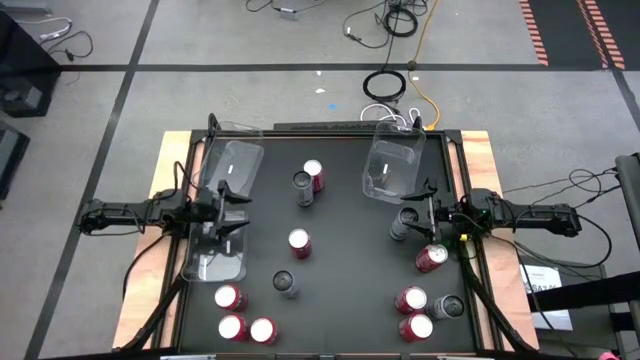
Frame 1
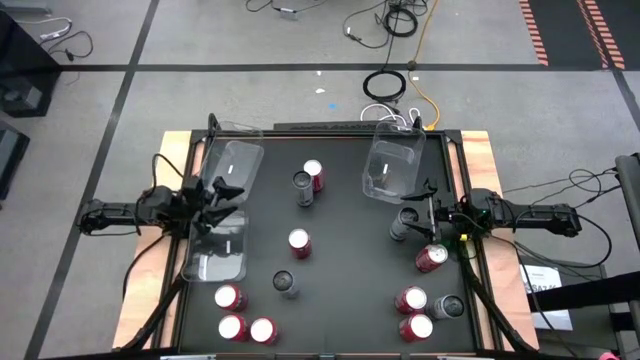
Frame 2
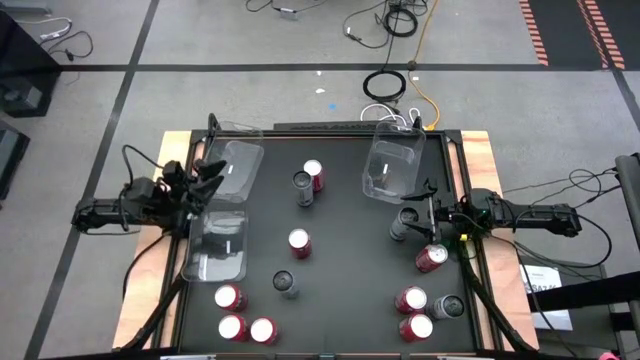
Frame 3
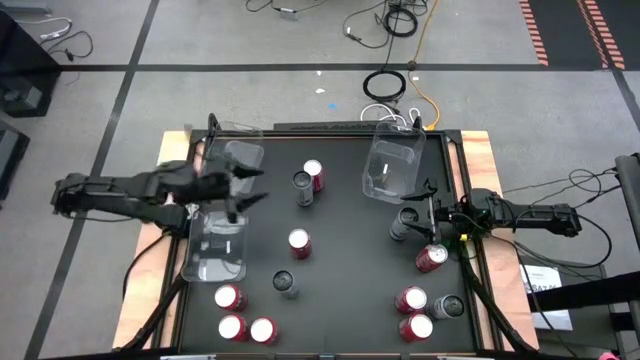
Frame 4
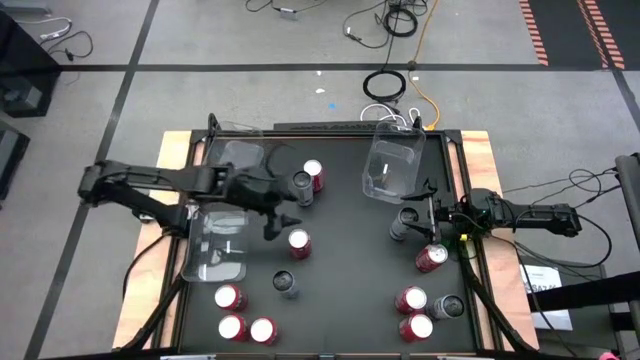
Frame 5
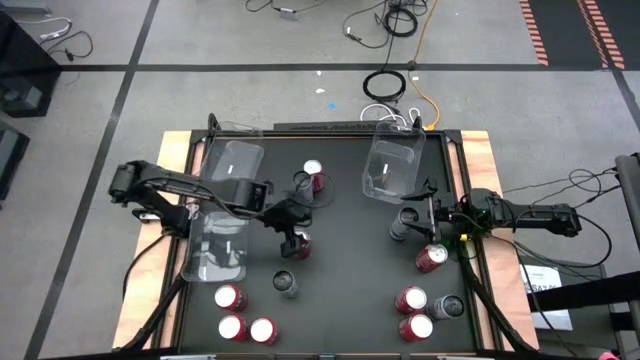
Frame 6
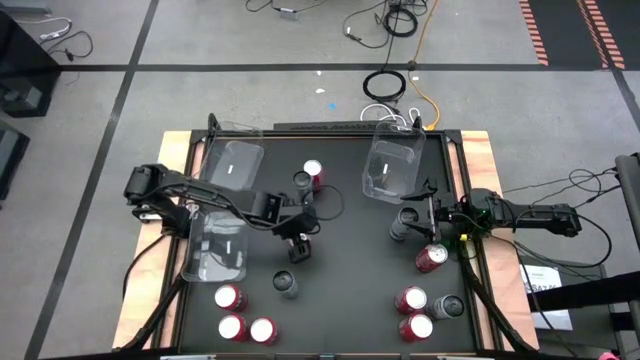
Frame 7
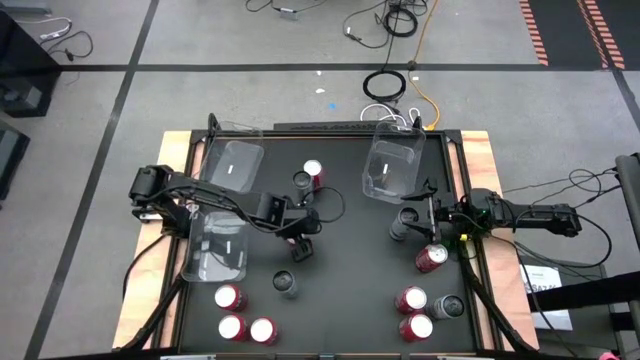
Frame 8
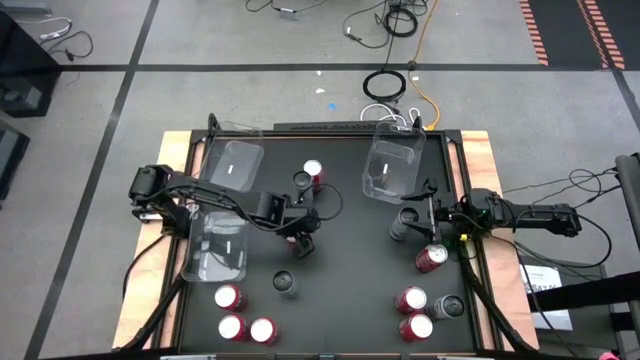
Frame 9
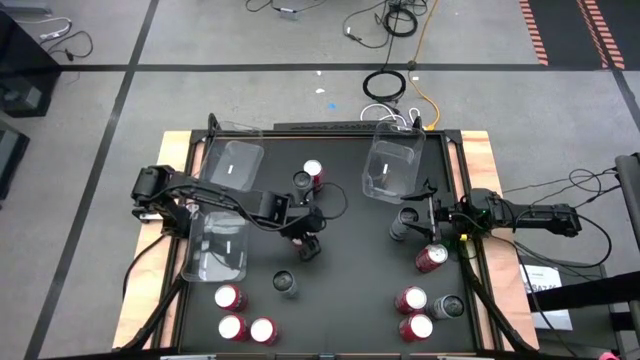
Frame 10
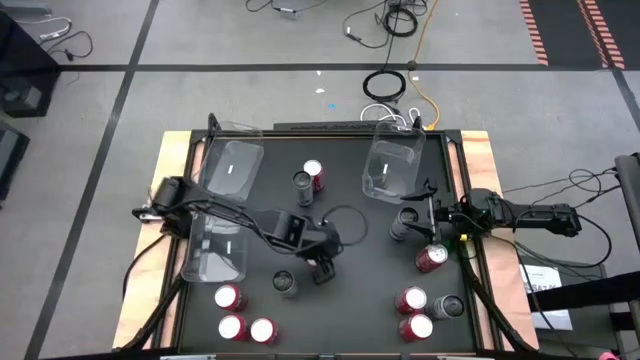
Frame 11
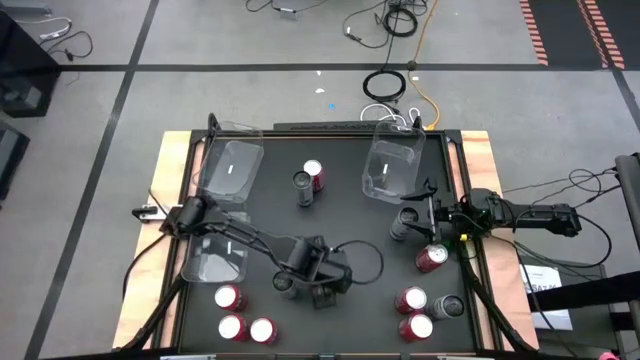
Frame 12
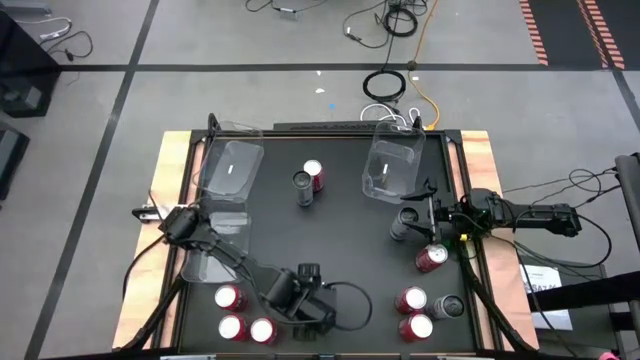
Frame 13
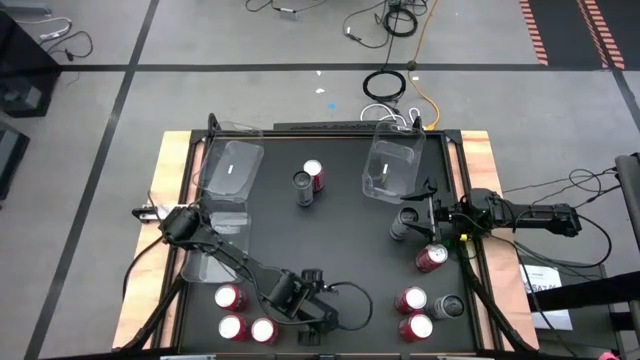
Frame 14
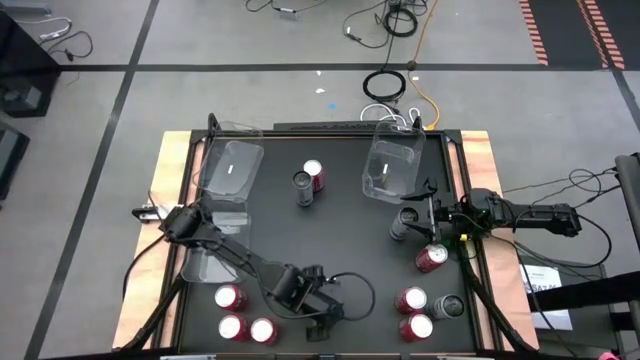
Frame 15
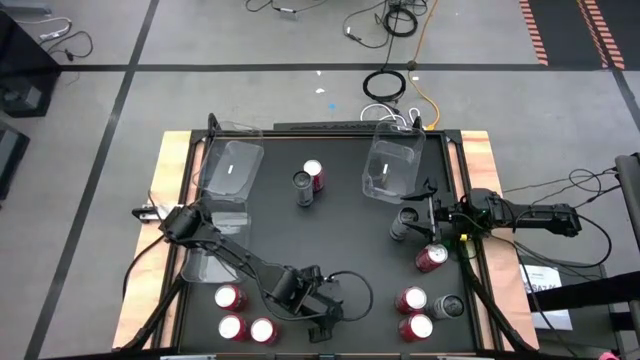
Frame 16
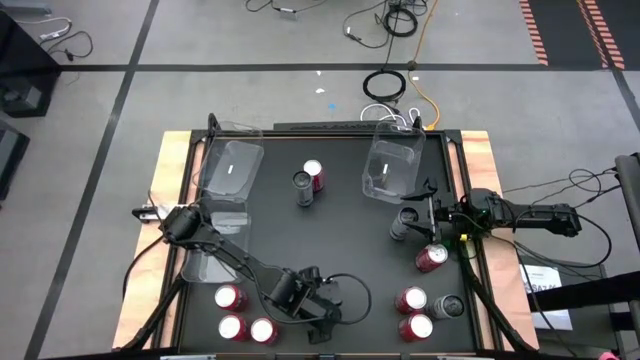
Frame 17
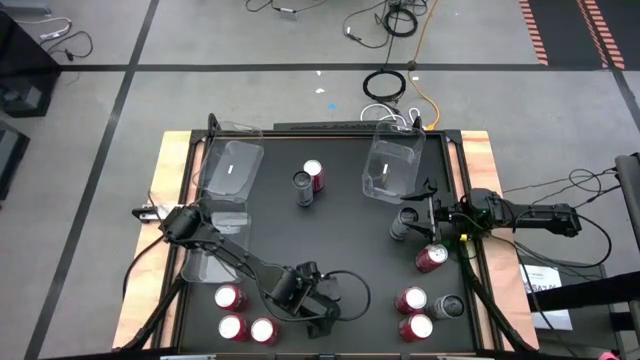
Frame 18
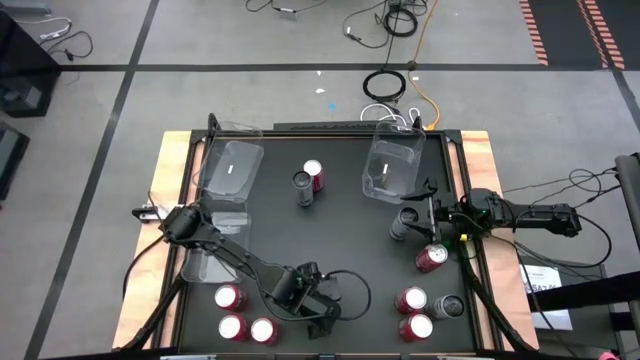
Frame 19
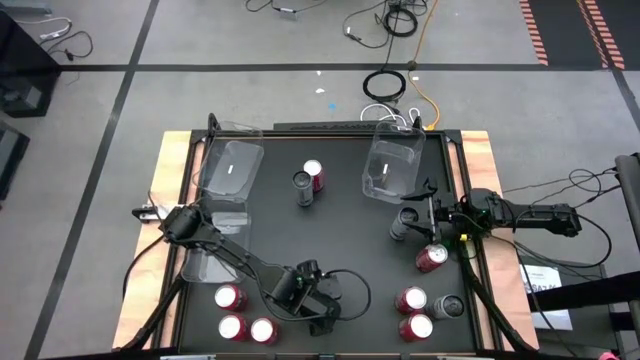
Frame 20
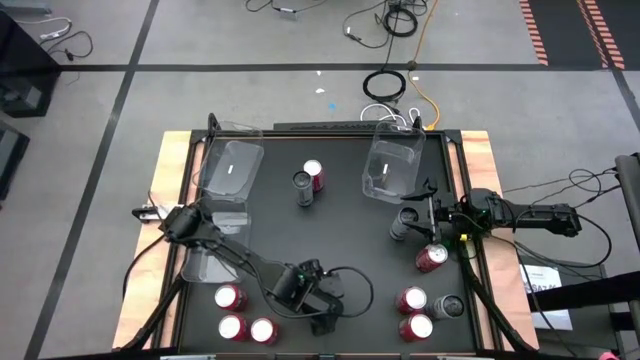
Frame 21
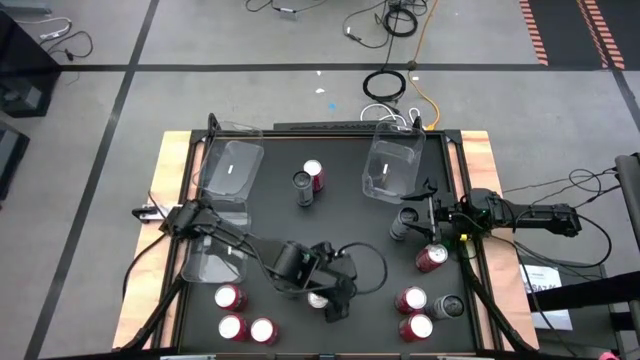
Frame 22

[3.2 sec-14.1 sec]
Task: Sort soda cans
Move the center red soda can to the bottom middle of the table

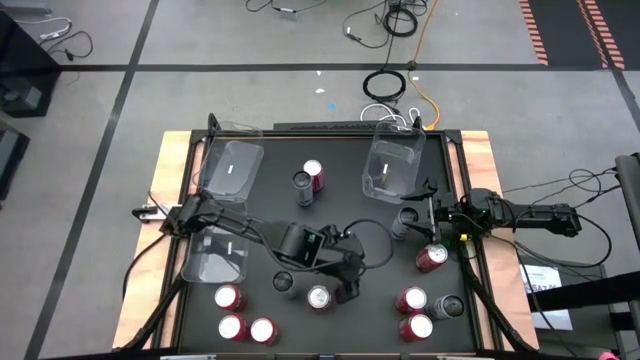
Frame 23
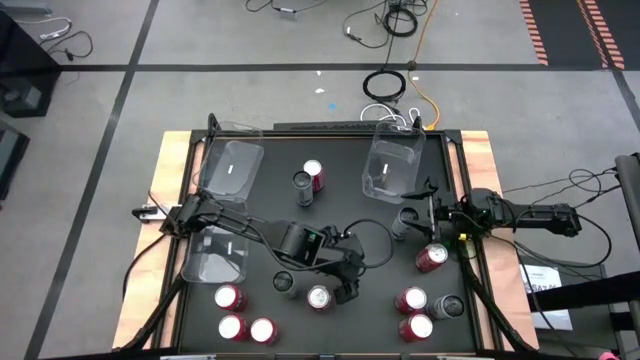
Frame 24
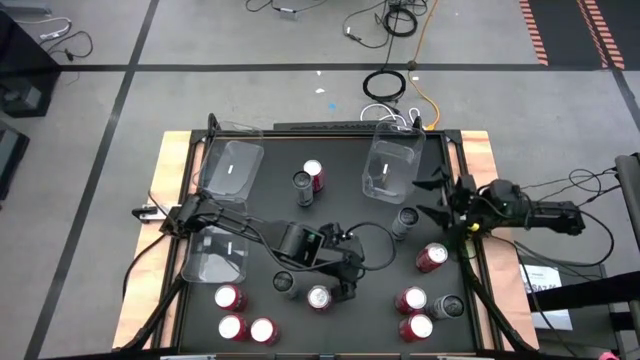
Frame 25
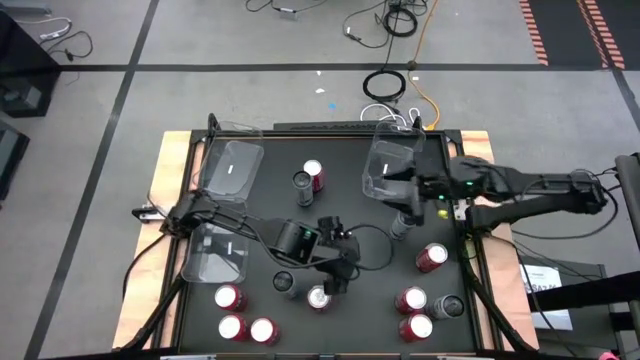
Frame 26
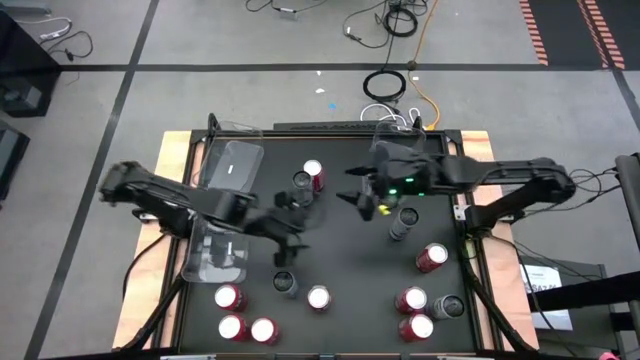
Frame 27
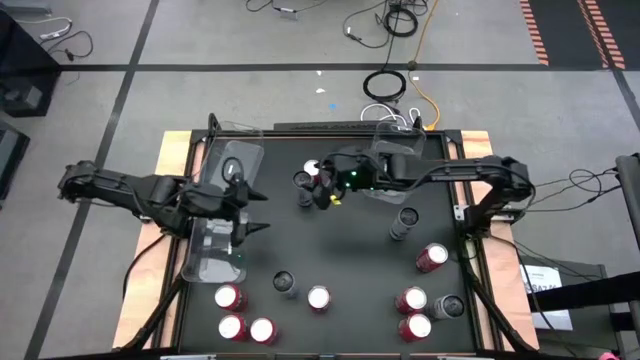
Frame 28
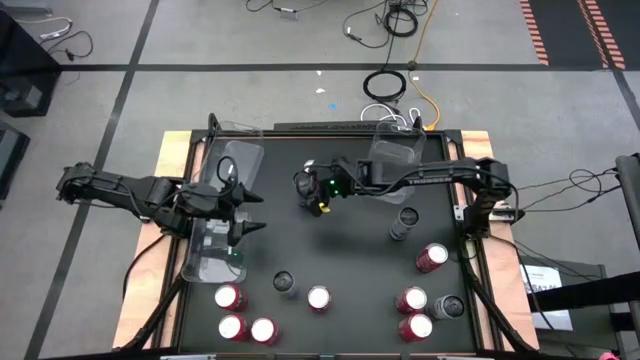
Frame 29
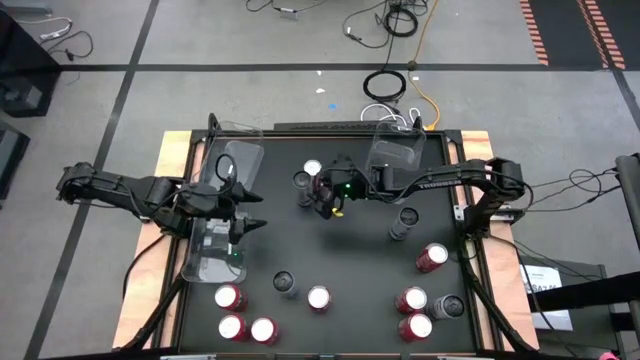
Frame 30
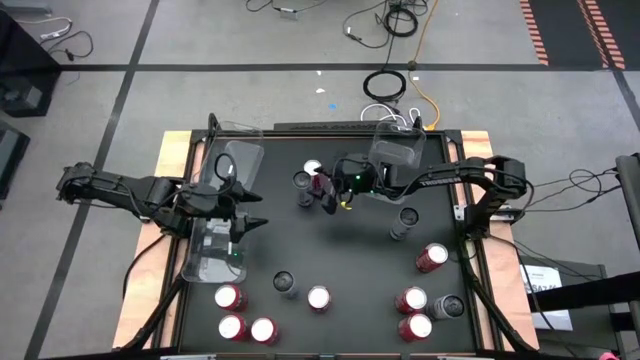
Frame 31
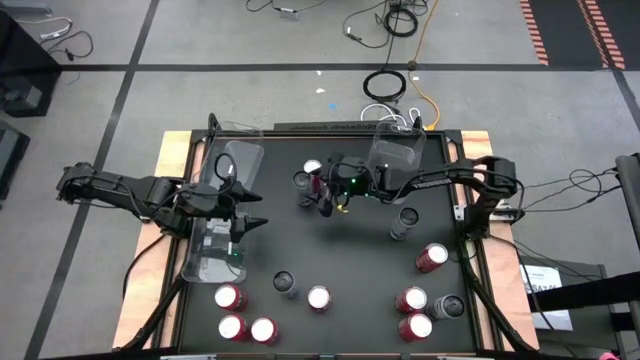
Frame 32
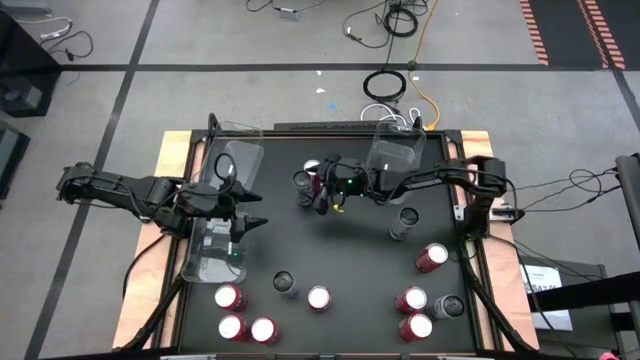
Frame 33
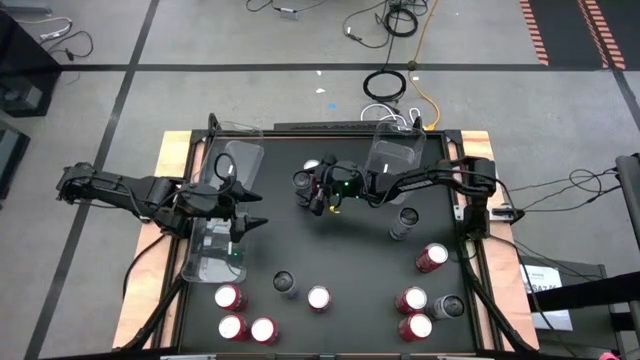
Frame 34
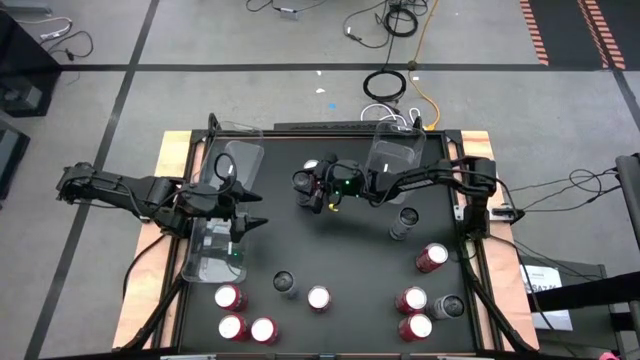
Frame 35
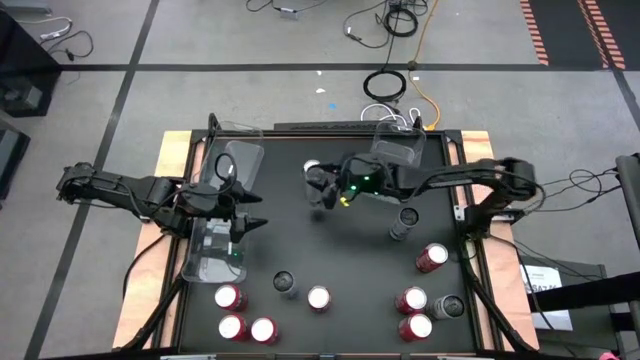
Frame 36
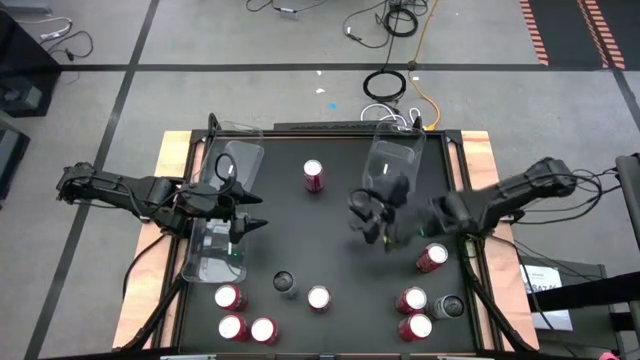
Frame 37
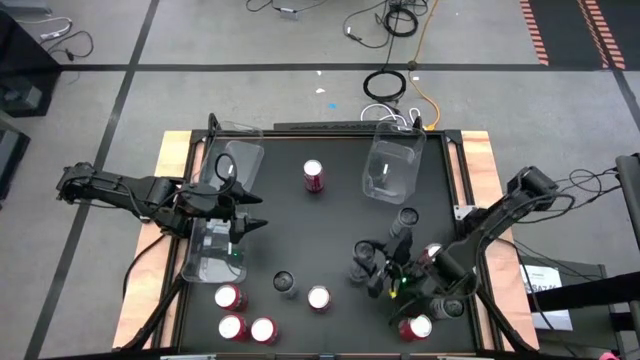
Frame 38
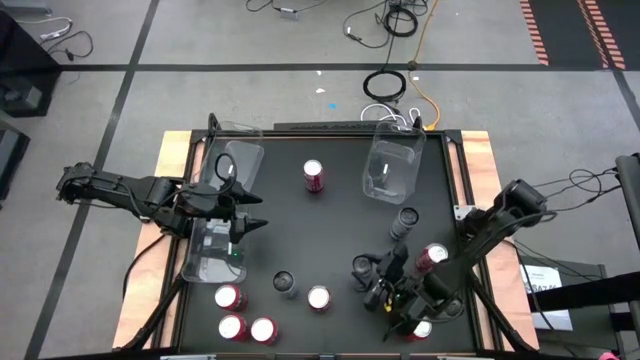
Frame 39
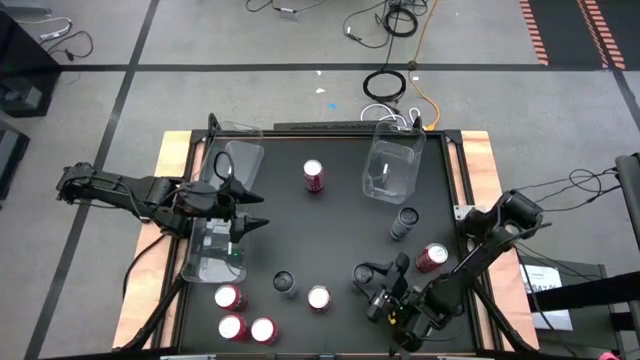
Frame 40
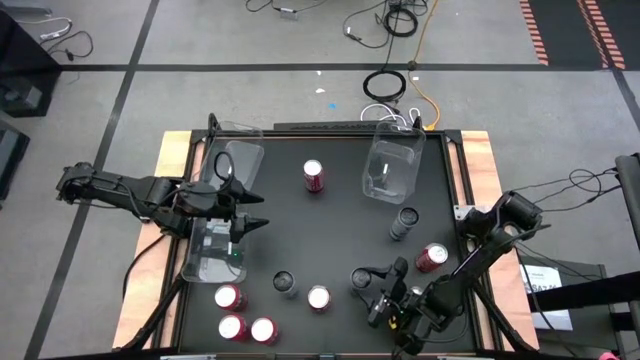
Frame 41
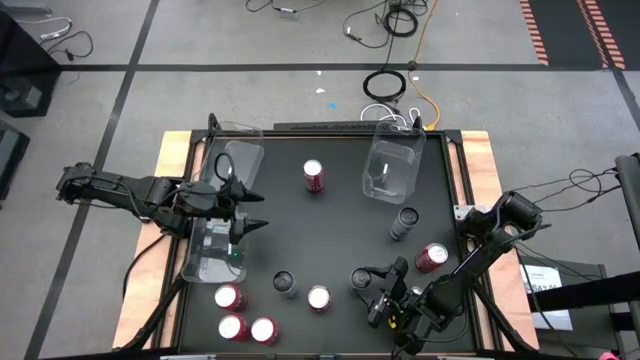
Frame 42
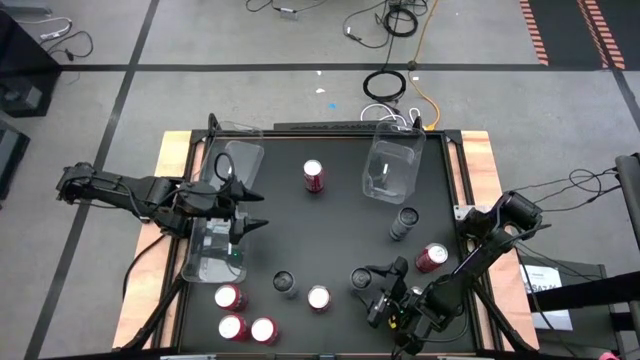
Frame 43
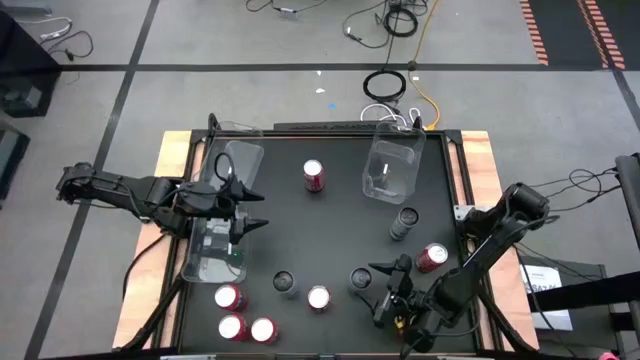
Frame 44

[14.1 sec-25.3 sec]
Move the top left white soda can to the bottom middle of the table
